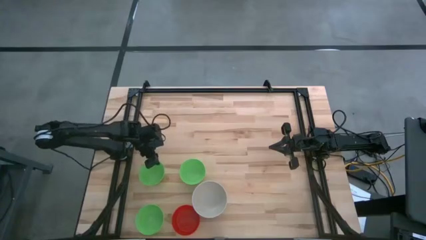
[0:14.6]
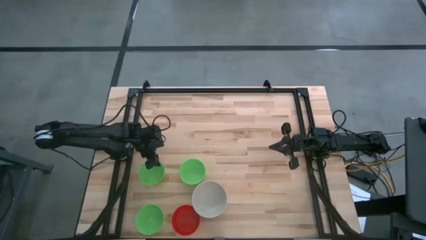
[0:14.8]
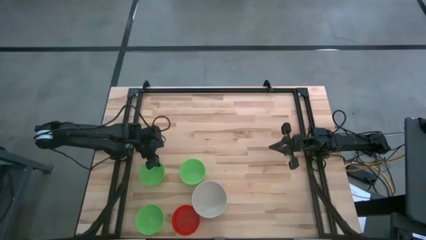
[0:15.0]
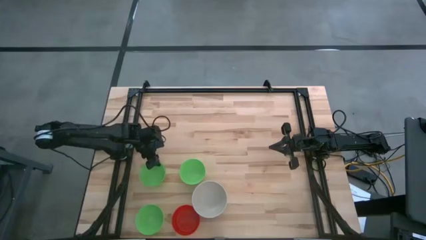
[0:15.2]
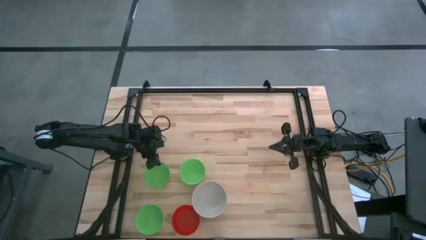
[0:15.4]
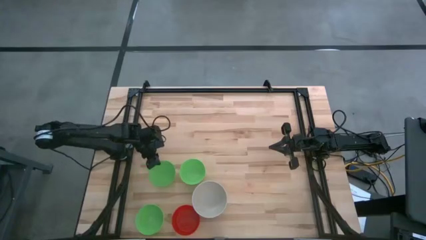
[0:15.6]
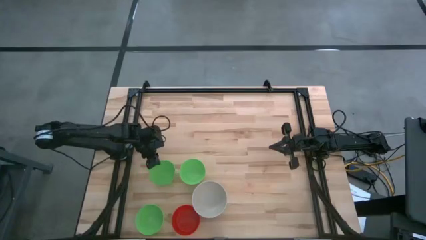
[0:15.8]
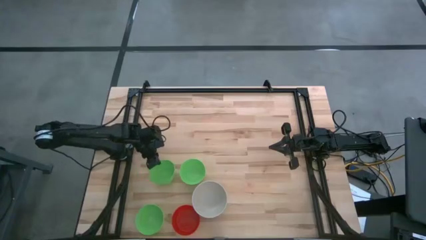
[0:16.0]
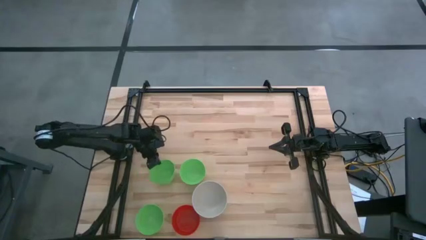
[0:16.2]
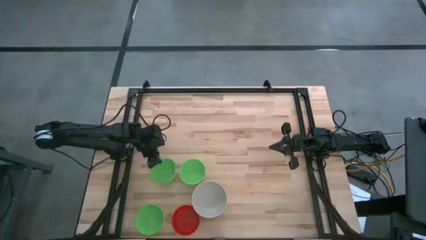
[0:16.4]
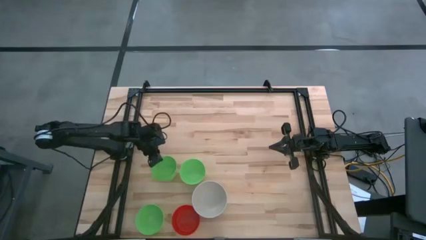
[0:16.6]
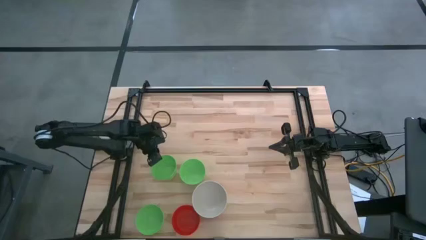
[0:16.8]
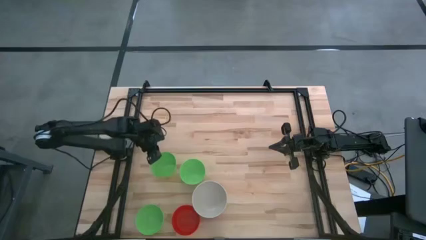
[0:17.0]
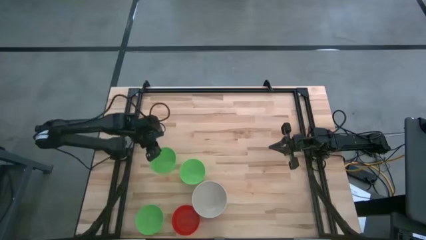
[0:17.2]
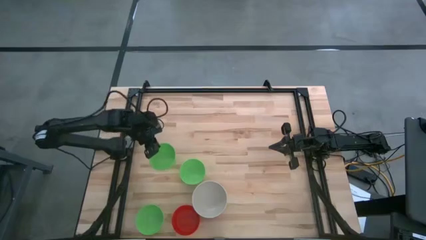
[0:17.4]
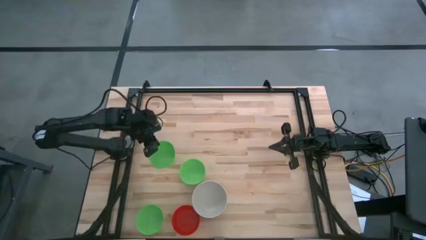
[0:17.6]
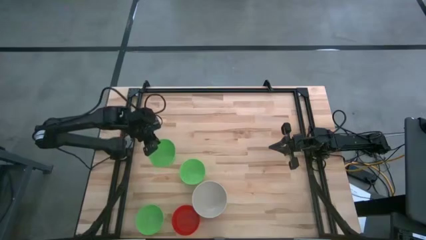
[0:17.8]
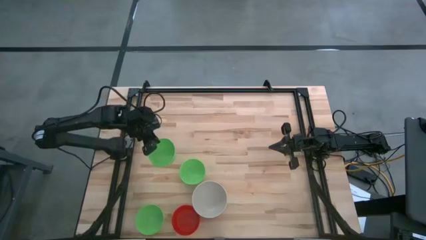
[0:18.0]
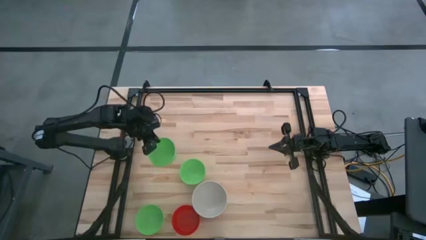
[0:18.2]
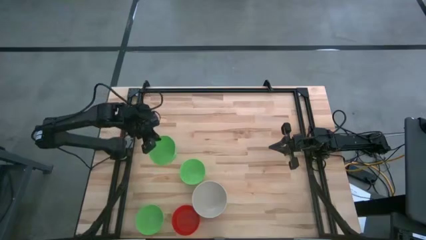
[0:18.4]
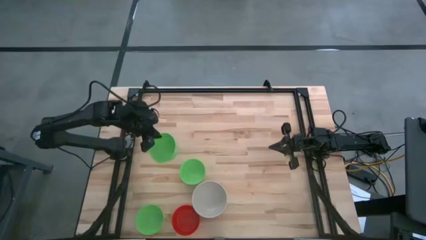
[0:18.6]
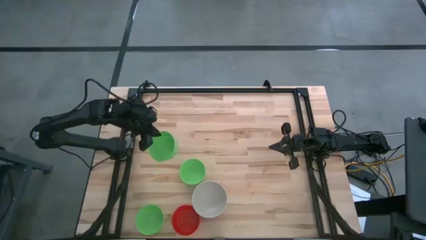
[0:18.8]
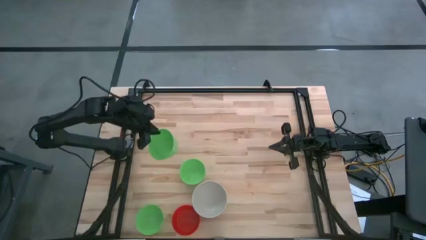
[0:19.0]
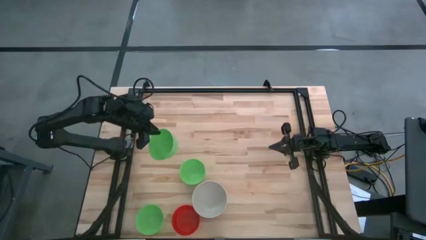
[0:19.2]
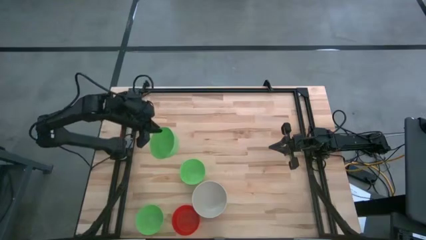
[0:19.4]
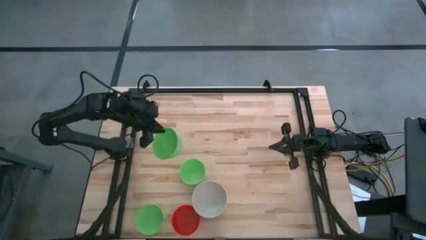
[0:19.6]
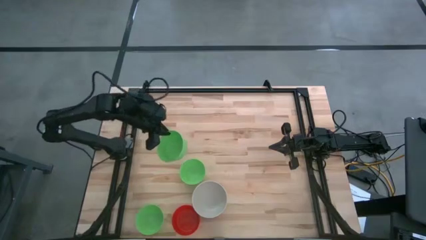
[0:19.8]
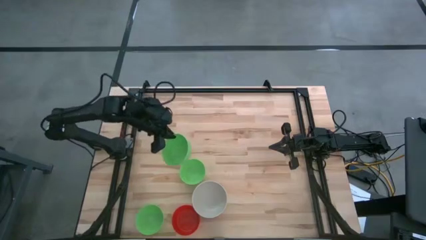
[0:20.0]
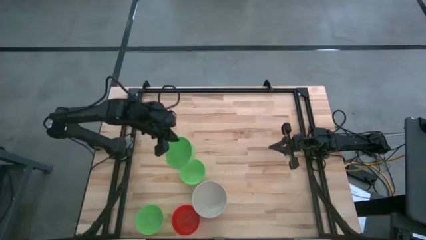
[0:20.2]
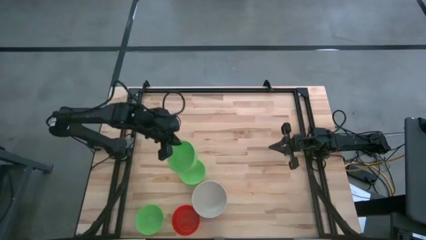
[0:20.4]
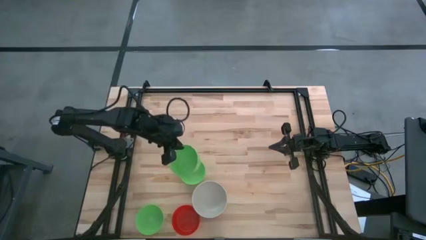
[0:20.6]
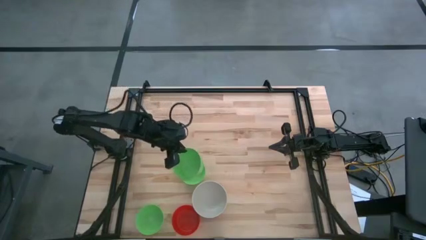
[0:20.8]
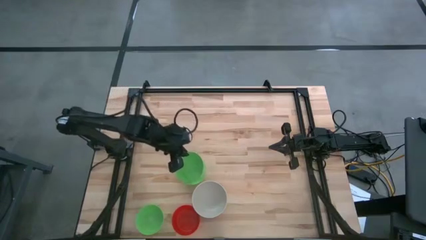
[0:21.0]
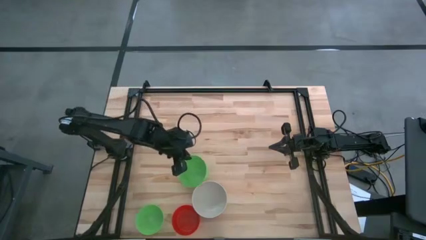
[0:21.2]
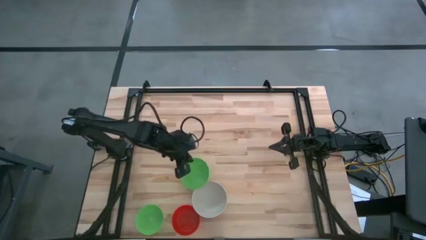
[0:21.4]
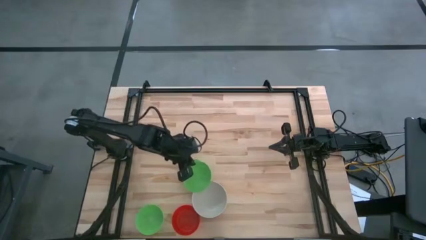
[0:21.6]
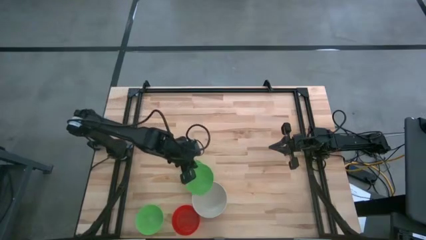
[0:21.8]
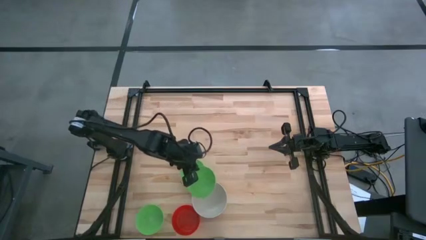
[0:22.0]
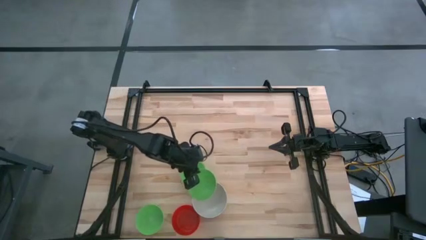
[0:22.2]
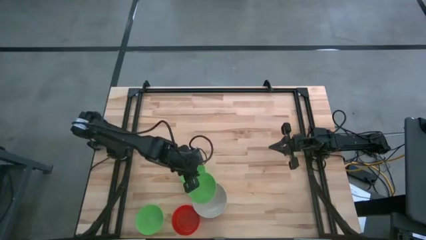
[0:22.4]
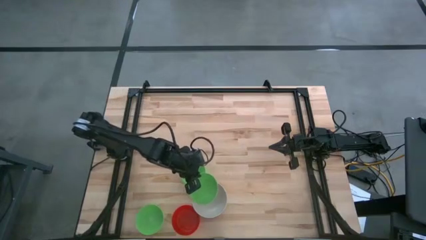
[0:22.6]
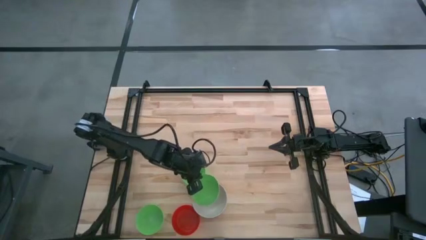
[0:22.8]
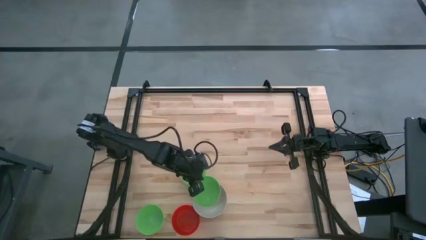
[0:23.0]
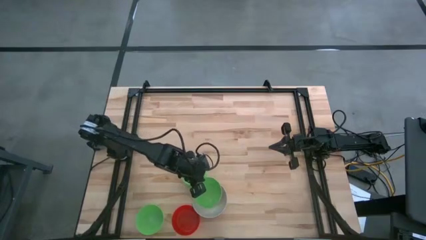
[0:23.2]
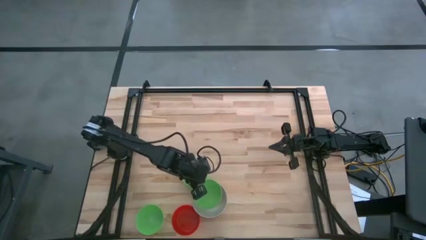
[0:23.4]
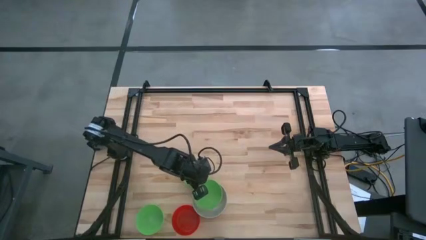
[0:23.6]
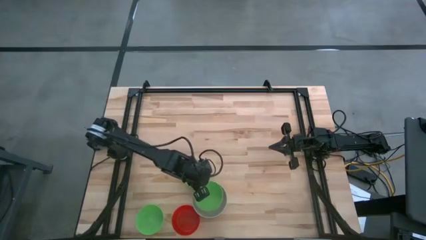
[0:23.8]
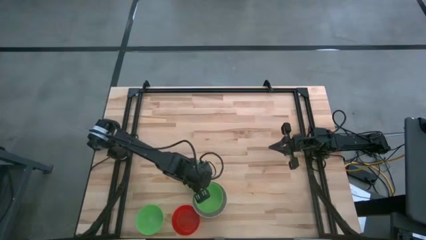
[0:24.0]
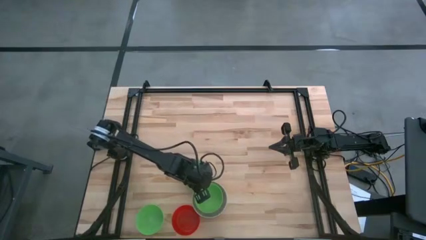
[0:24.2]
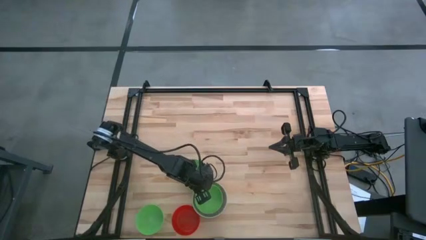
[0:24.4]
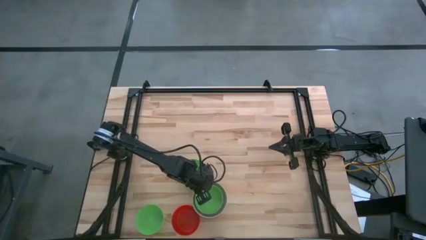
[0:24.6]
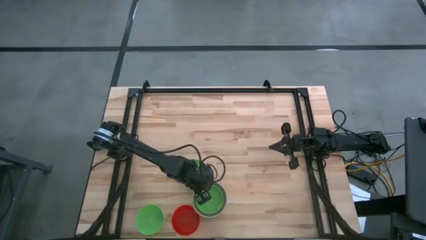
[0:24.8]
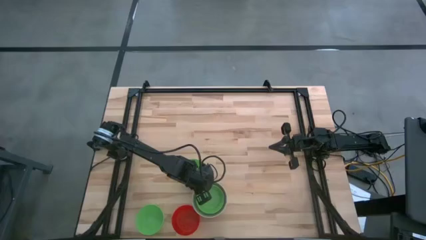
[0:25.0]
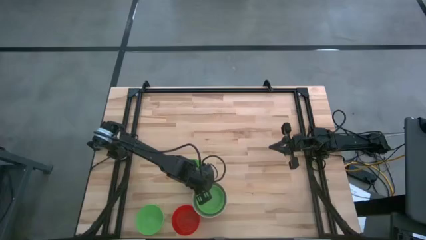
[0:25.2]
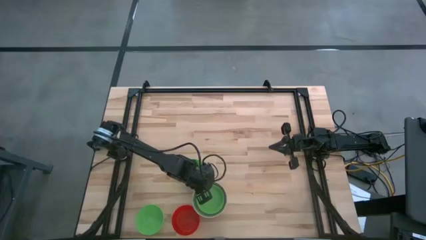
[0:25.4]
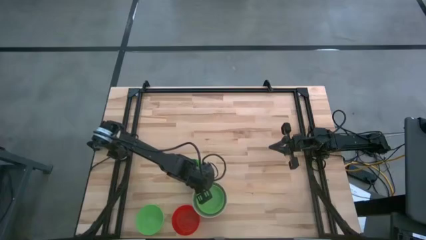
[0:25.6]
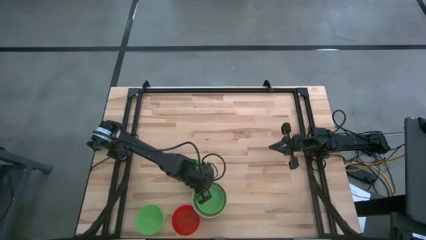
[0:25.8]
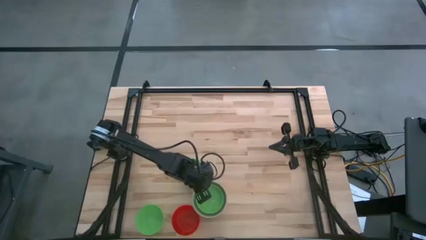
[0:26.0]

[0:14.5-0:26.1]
Stack the top left green bowl on top of the white bowl
